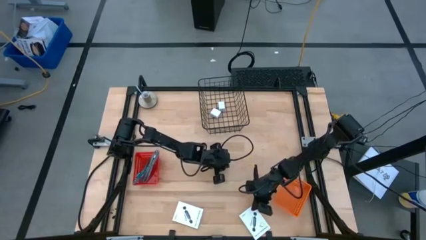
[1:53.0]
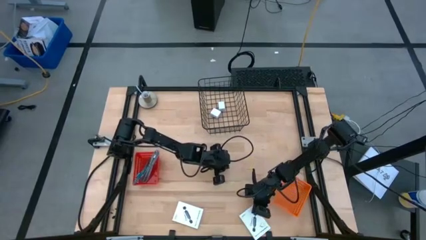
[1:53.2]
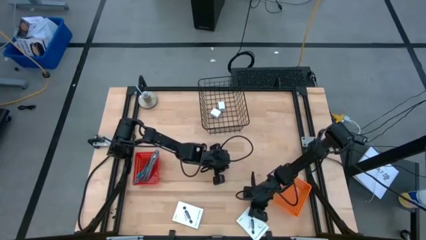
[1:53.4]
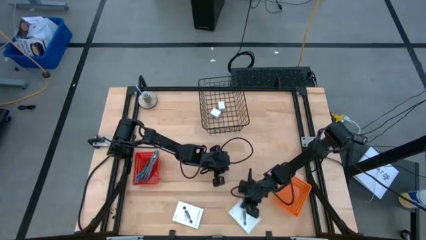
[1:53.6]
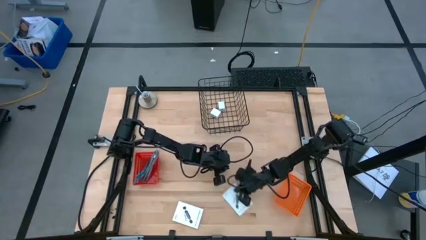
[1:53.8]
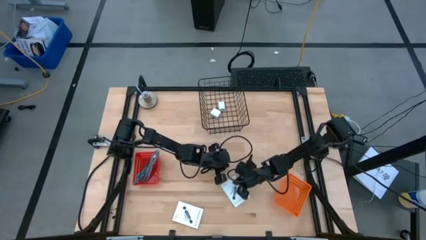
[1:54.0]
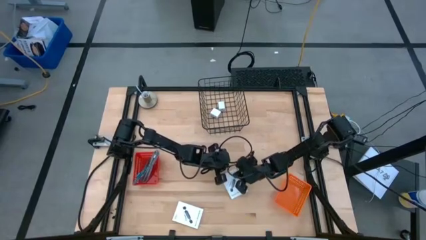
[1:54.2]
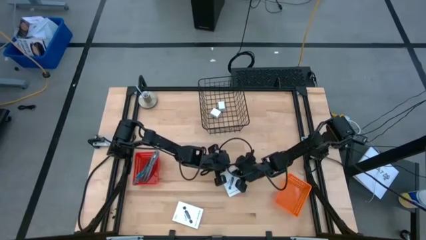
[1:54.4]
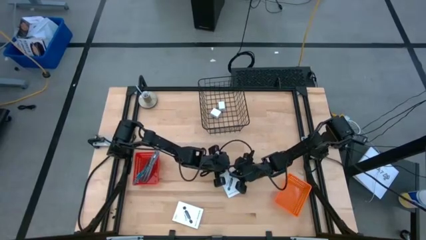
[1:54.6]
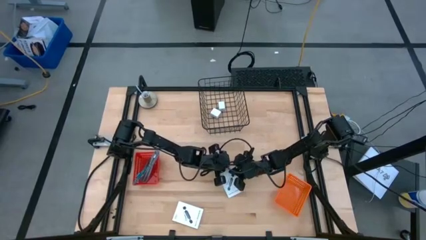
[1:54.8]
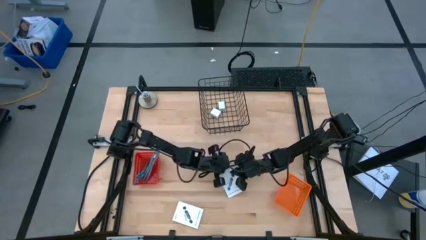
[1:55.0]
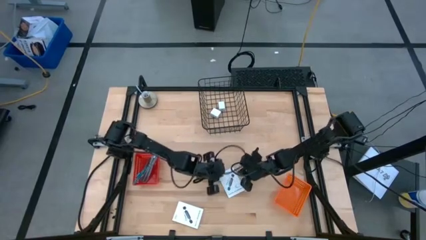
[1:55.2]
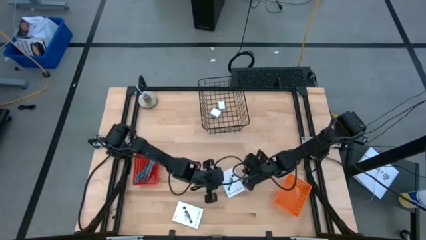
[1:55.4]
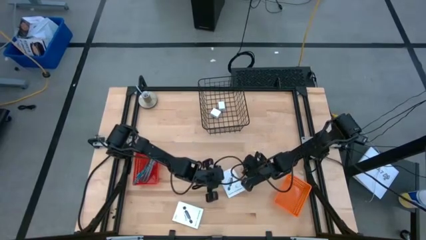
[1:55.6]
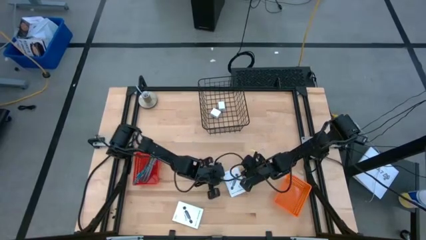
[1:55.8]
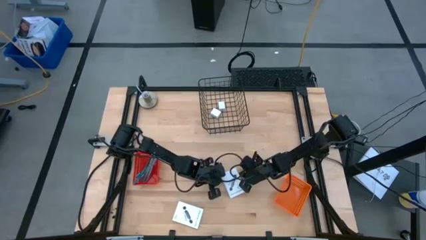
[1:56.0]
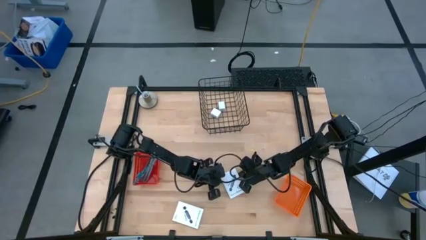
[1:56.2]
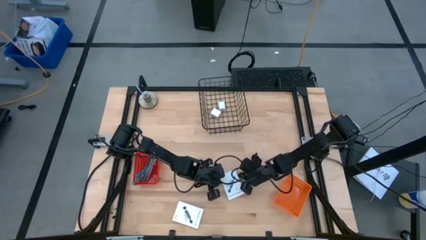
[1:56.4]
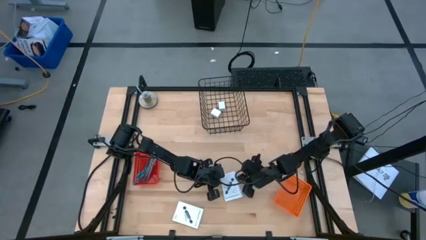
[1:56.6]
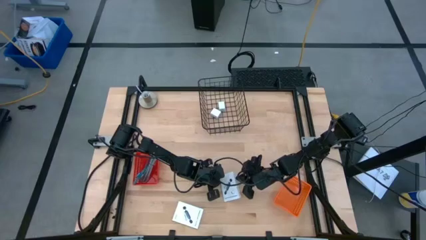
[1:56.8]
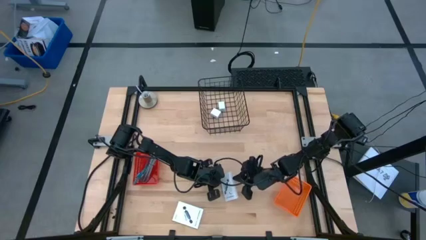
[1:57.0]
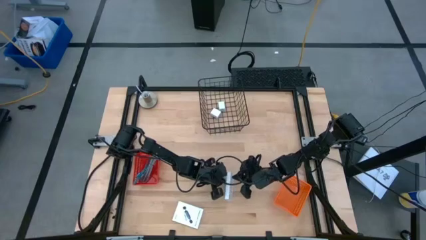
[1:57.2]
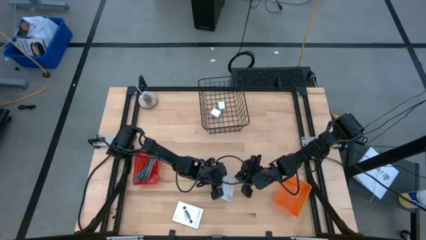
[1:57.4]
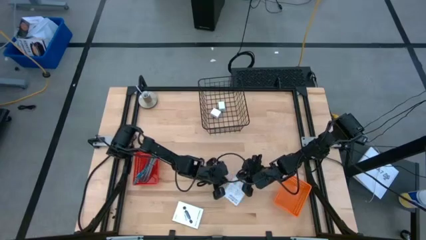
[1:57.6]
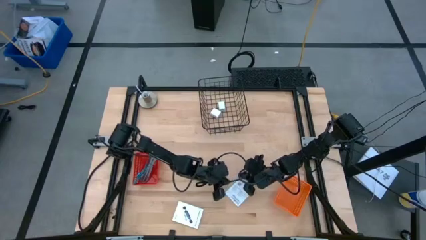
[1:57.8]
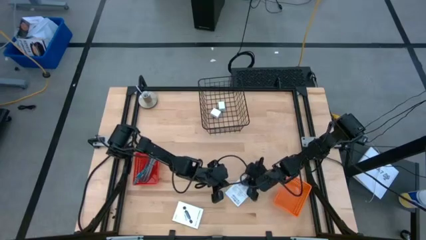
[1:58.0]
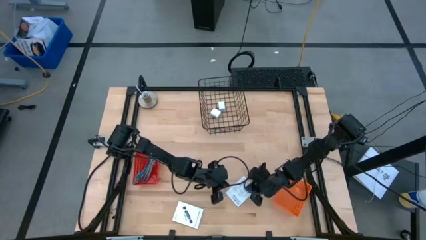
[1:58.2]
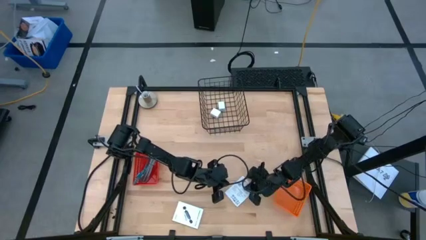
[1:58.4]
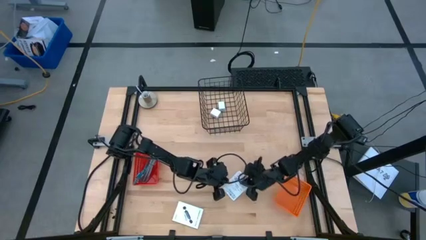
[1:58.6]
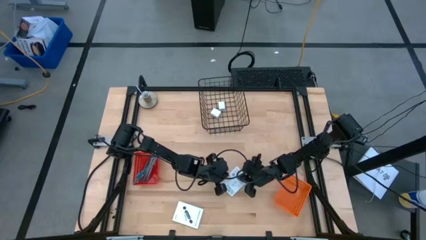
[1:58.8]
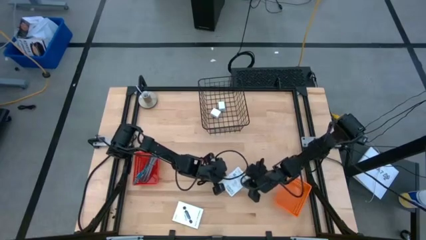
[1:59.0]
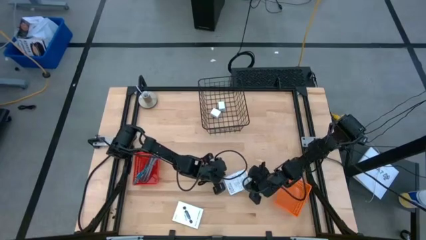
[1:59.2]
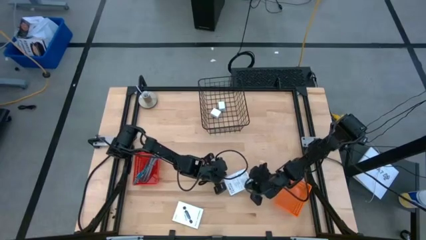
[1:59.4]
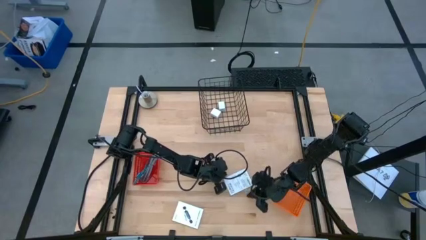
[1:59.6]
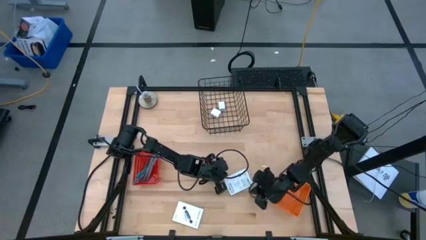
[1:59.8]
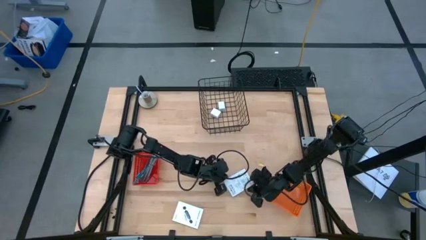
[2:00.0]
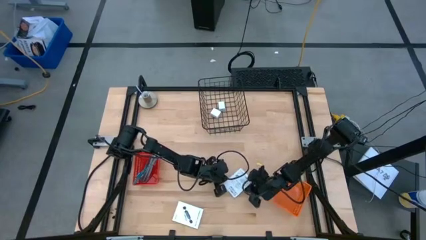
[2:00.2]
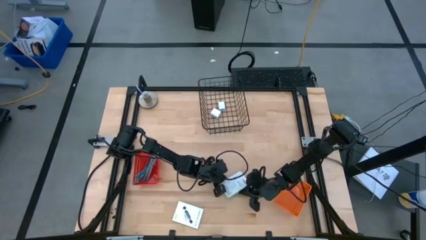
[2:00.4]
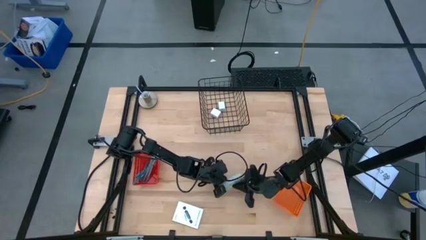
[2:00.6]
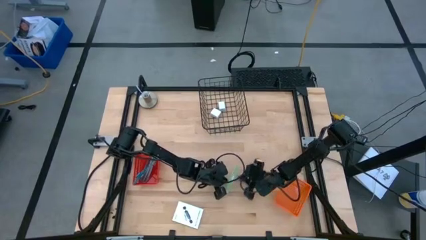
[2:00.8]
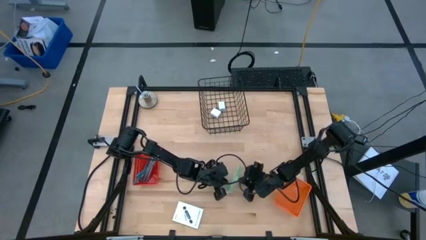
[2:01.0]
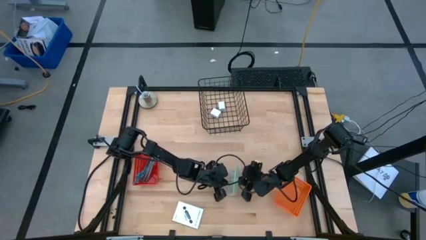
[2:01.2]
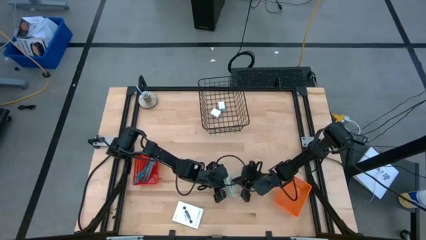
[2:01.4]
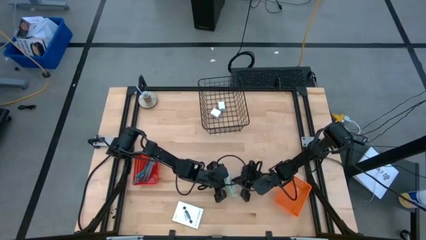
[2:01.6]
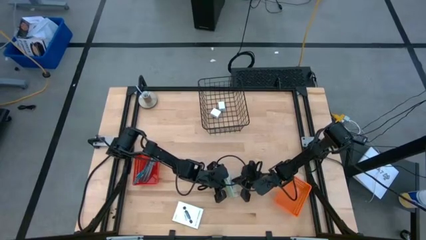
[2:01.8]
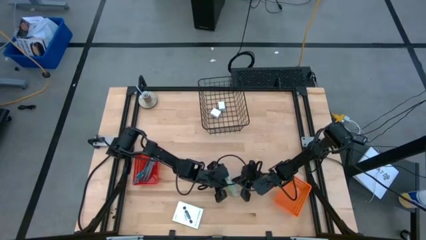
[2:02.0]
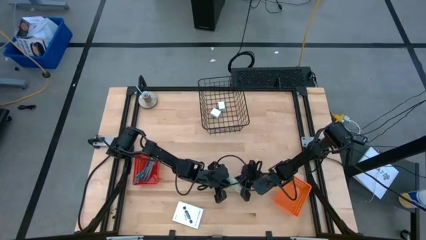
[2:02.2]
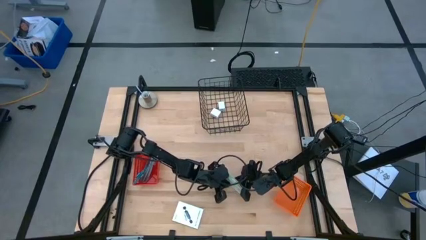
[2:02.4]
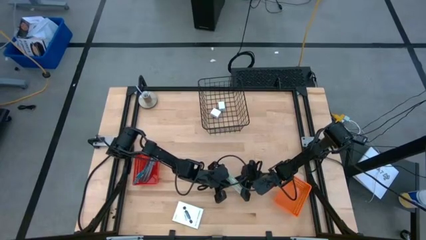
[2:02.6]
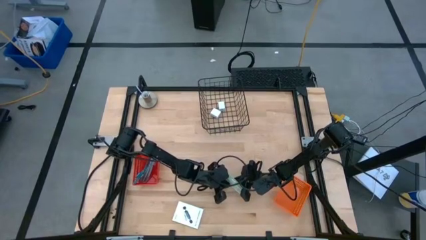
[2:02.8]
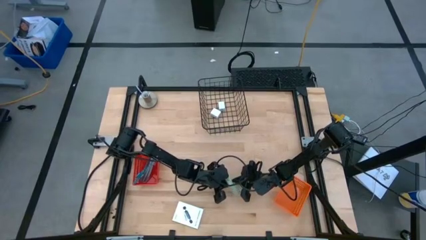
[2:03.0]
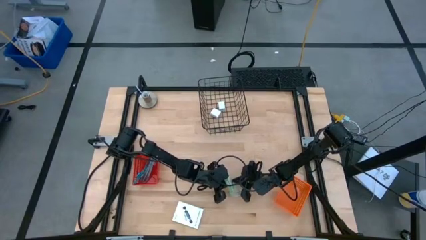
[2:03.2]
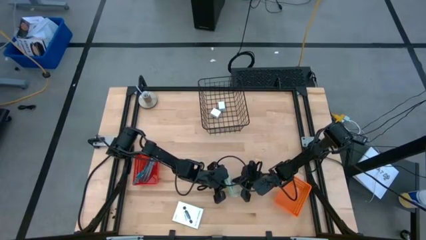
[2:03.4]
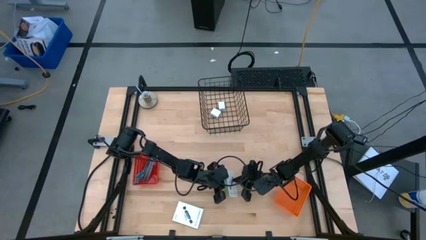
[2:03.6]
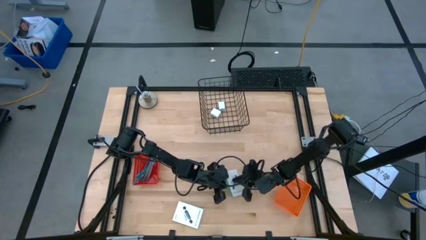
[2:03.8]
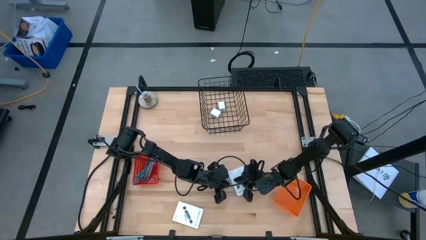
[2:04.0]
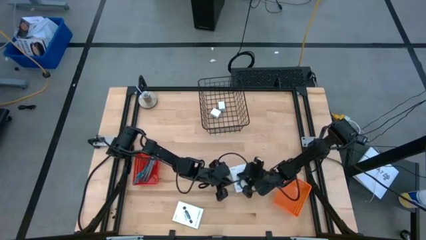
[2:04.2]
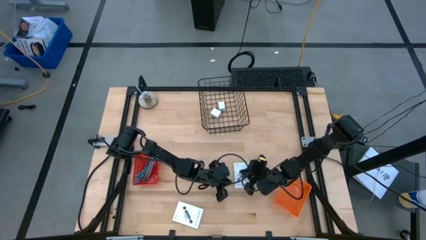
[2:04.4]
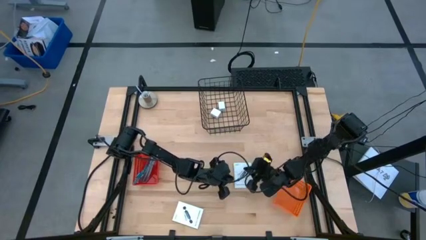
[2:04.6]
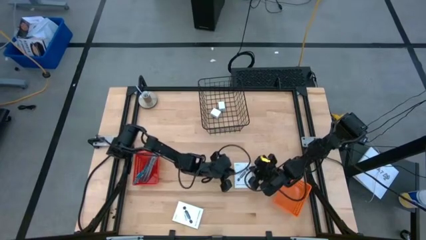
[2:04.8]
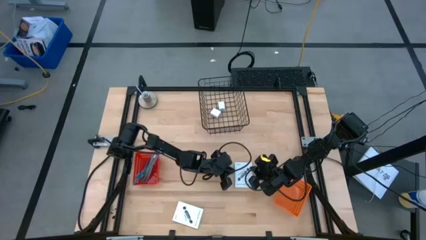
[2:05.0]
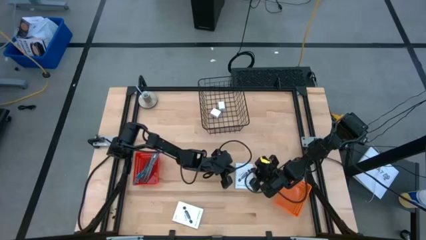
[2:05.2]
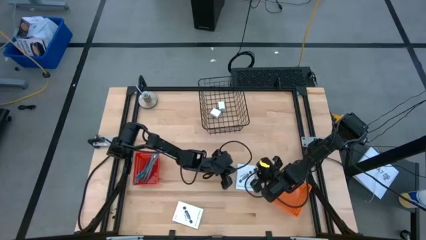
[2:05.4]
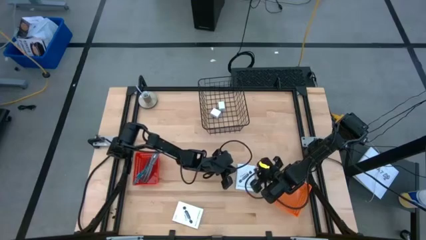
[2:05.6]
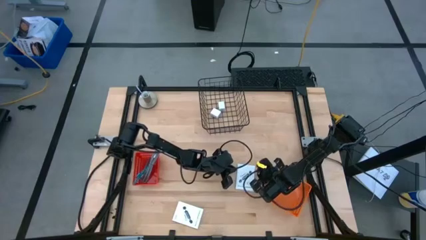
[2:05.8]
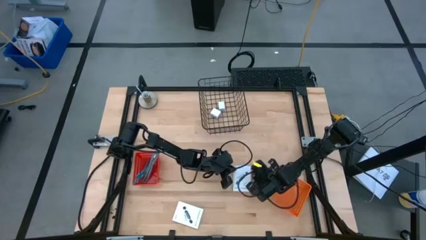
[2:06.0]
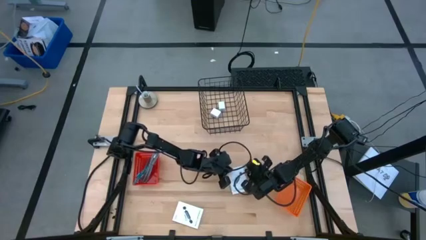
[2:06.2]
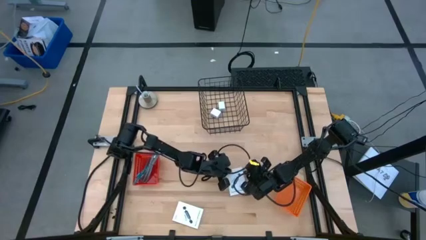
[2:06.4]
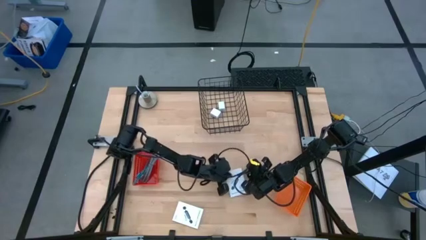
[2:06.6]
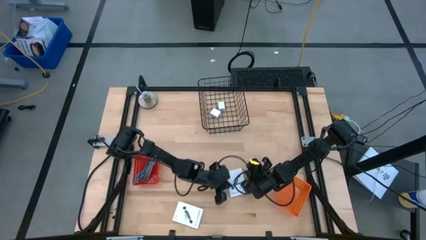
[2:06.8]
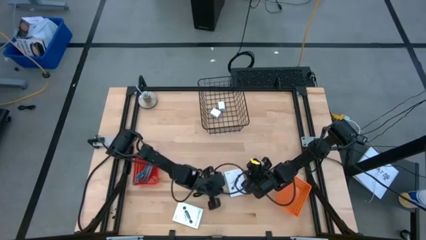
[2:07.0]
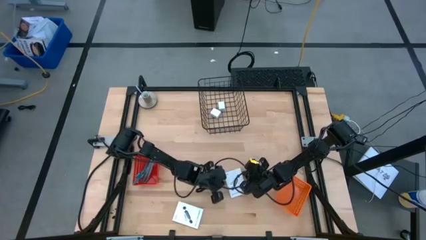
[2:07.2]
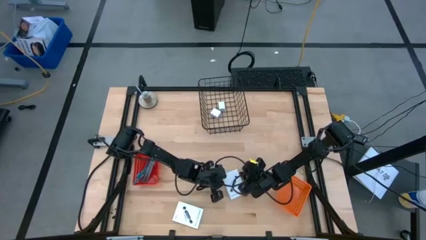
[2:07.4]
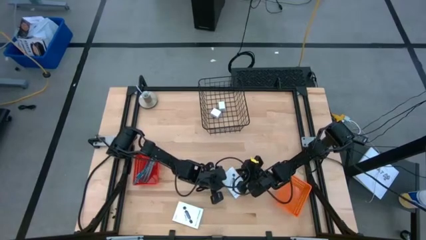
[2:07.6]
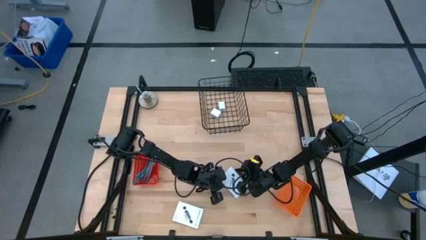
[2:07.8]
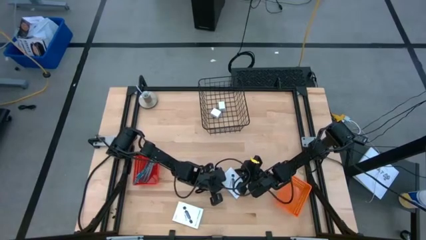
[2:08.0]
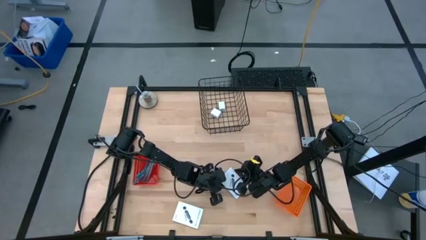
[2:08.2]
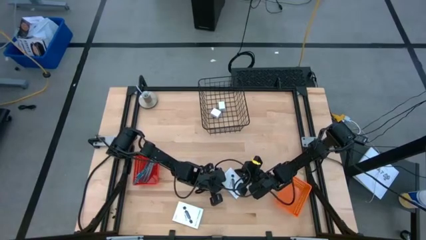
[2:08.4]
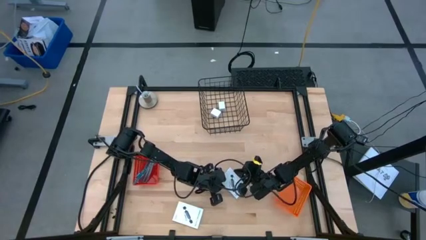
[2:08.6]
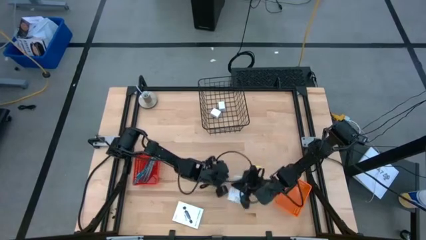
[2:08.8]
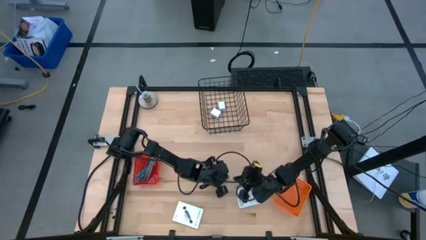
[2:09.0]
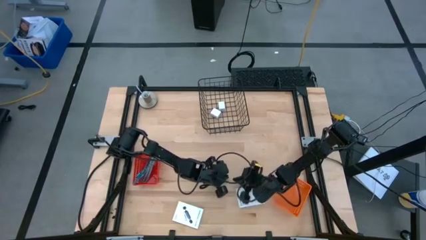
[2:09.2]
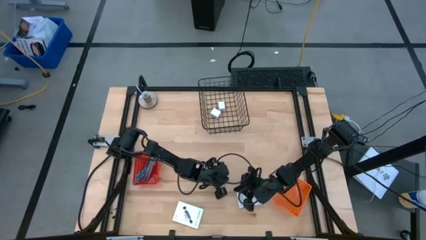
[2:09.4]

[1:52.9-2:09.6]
Task: Pick and place items into bin
Put the right card reader box into the orange basket
